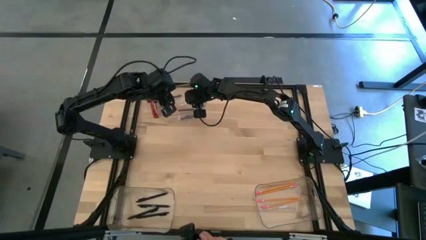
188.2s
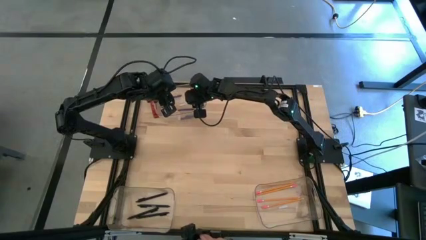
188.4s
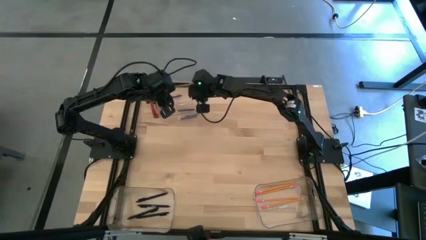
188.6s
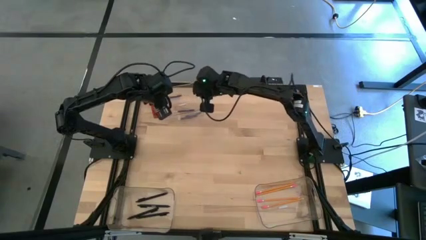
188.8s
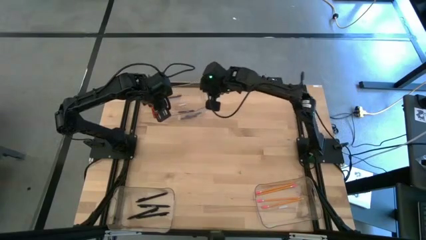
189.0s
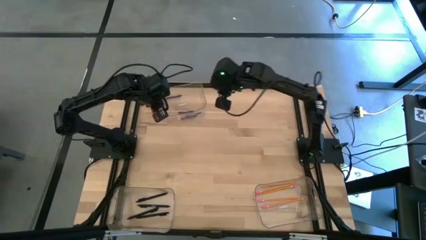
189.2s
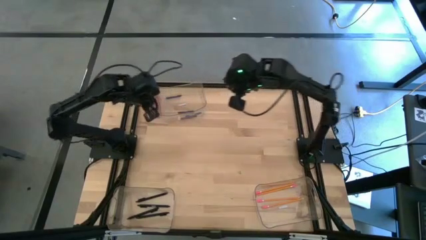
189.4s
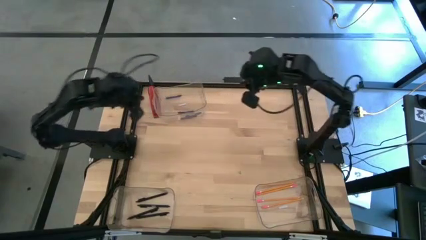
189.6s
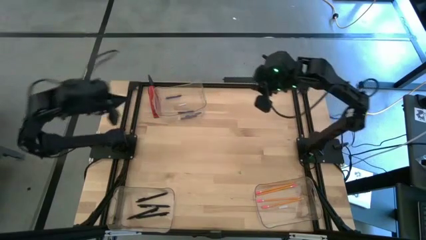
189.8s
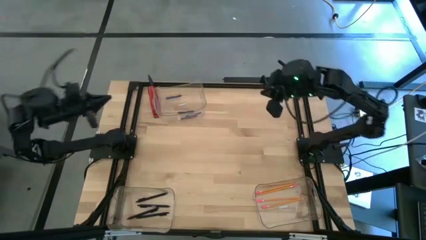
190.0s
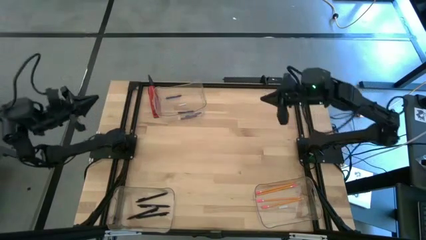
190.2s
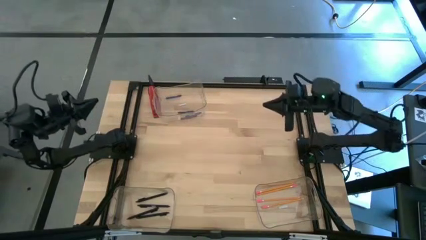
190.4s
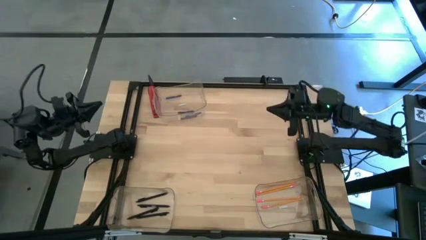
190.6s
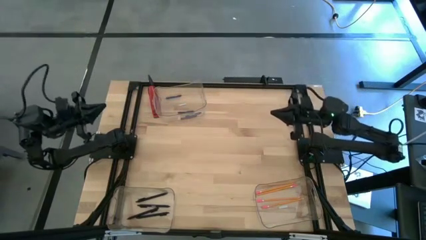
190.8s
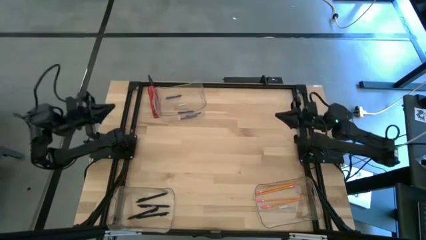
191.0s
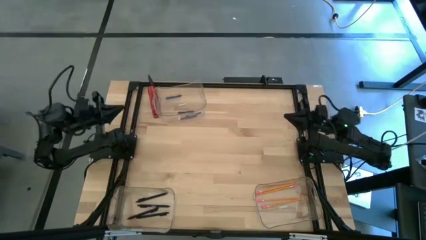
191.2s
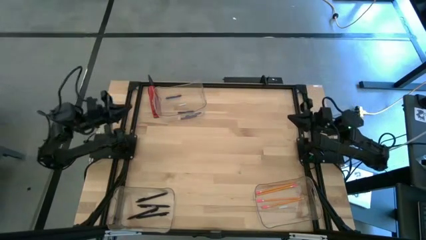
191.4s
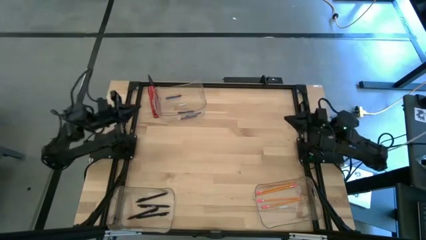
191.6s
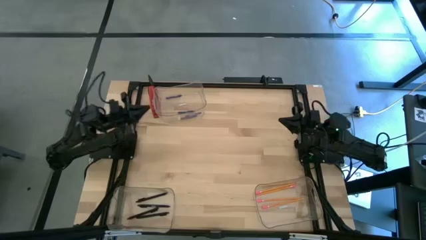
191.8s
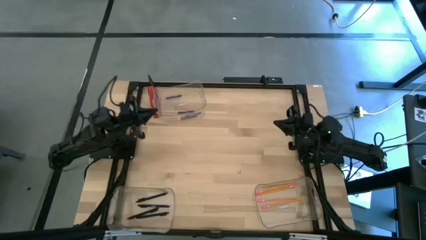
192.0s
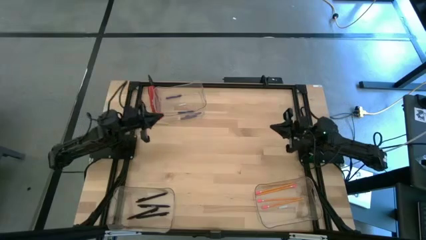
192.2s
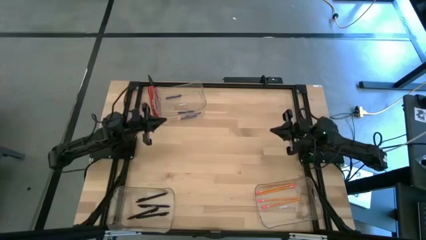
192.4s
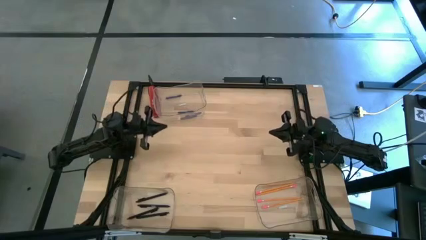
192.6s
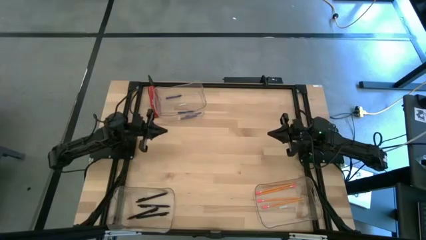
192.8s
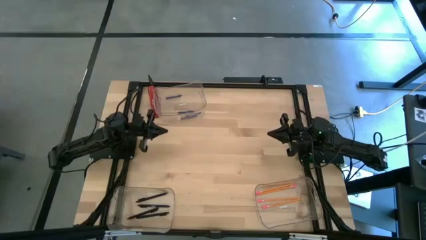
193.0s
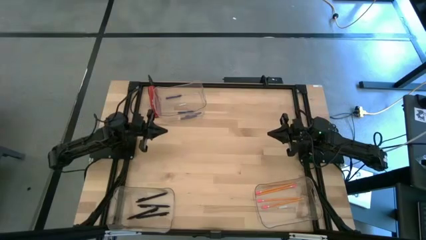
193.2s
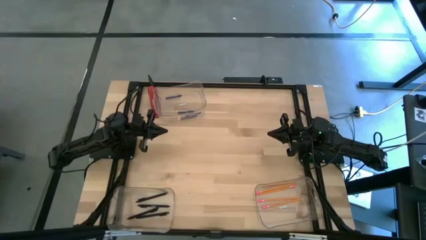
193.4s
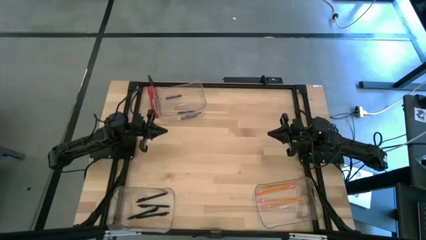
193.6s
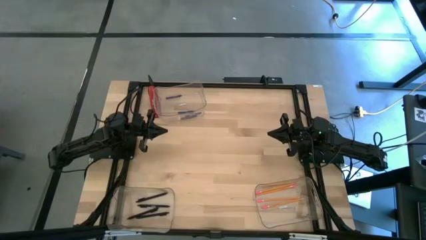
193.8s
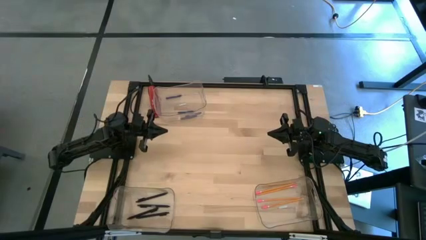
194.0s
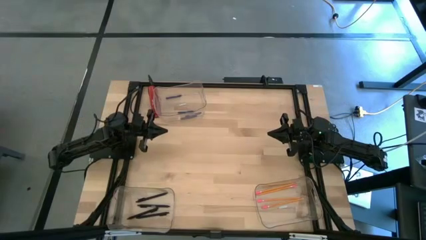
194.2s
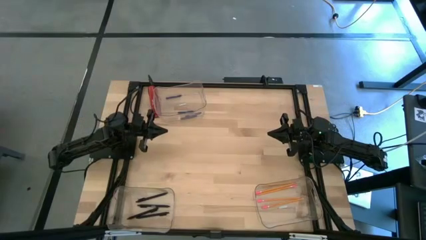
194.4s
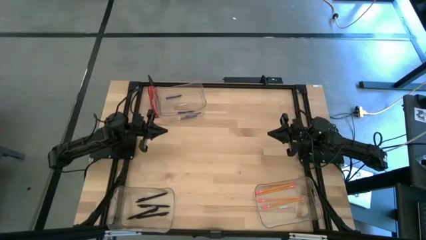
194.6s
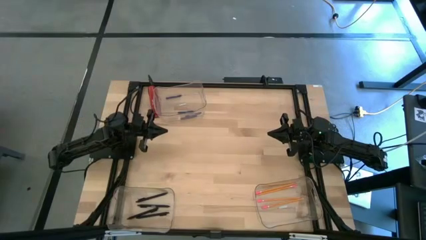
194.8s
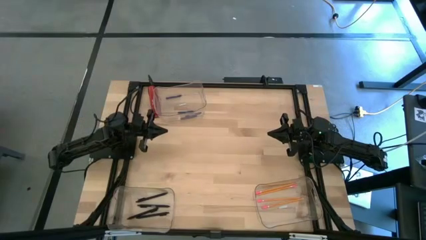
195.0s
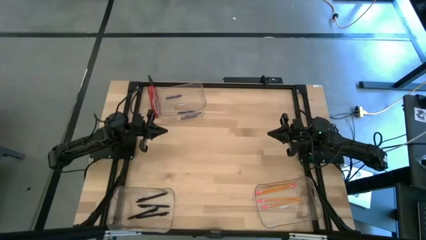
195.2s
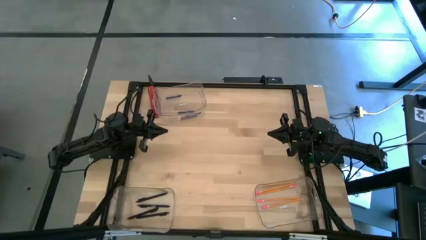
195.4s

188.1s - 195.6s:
Task: Sort crayons/erasers/pens/pencils in bins
Return to Home Position

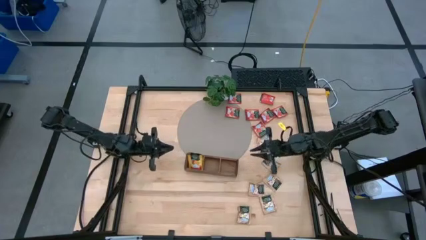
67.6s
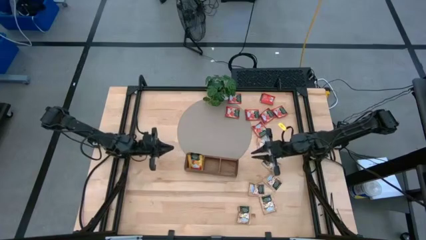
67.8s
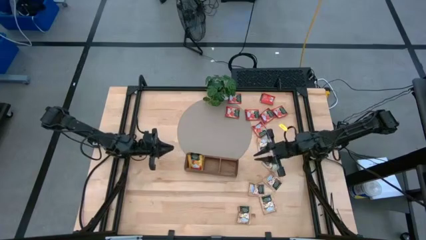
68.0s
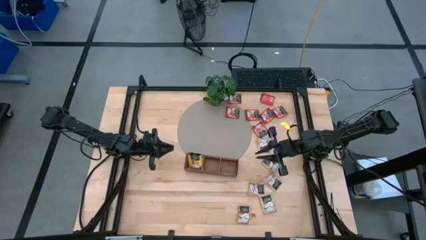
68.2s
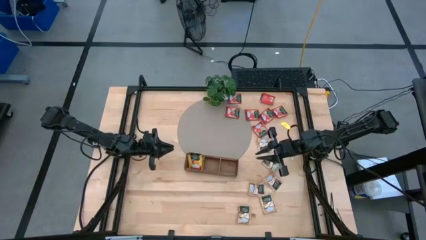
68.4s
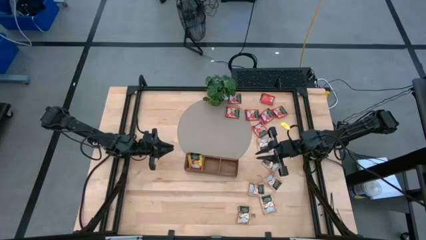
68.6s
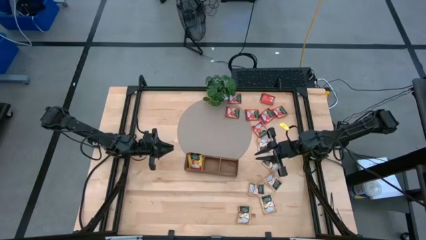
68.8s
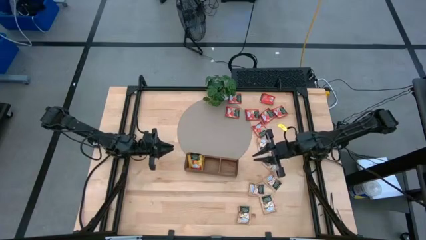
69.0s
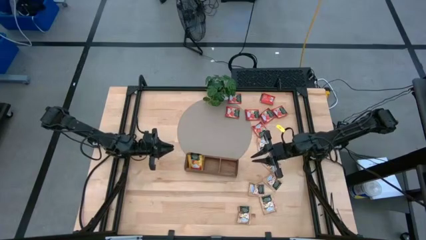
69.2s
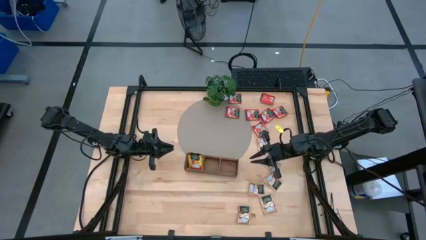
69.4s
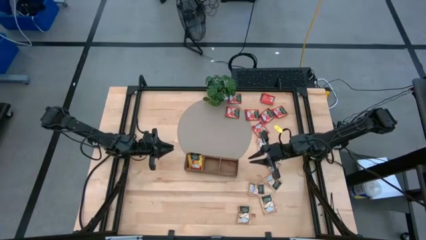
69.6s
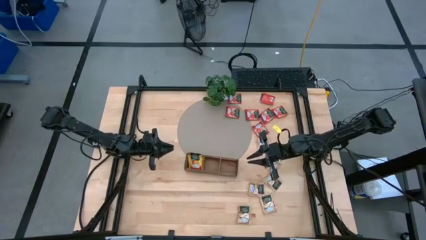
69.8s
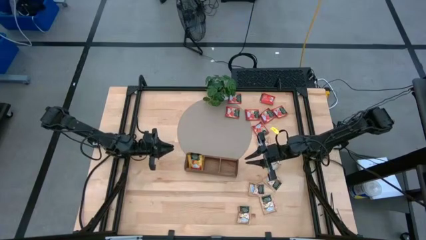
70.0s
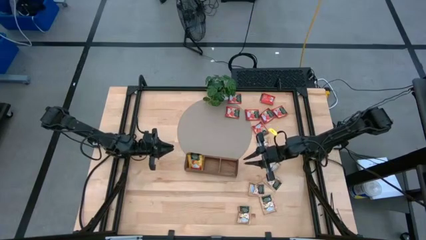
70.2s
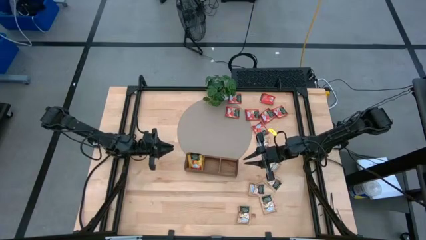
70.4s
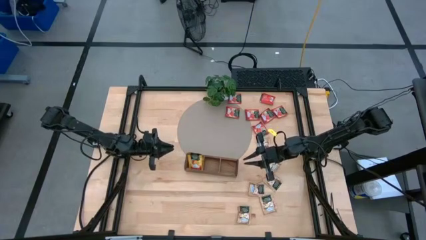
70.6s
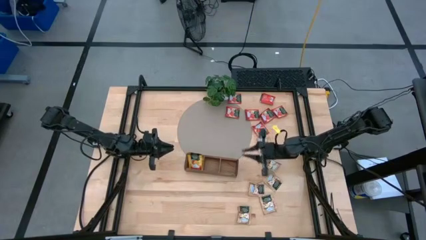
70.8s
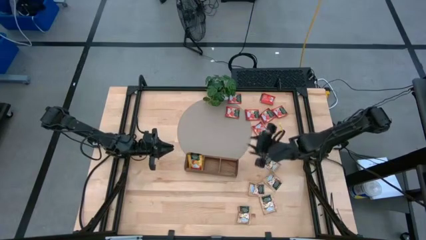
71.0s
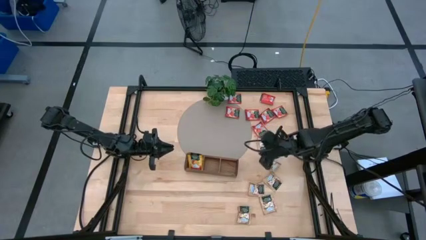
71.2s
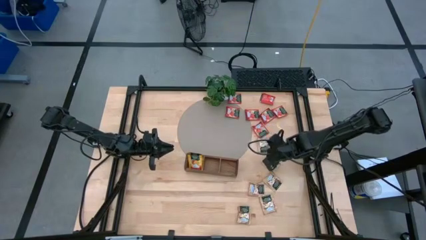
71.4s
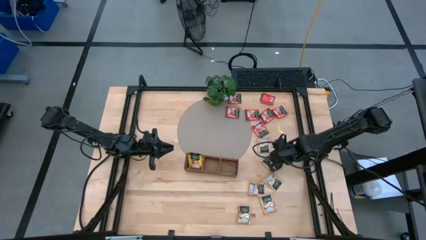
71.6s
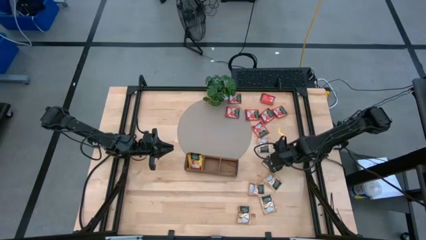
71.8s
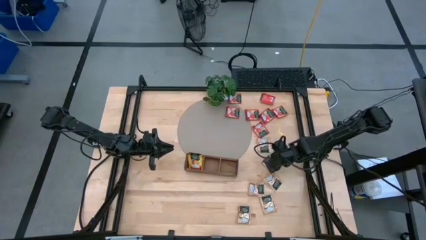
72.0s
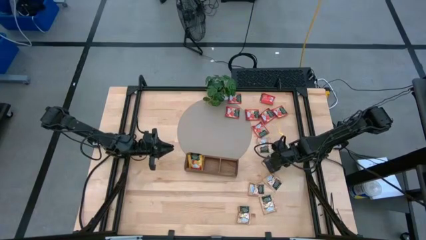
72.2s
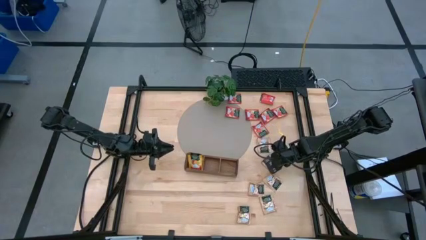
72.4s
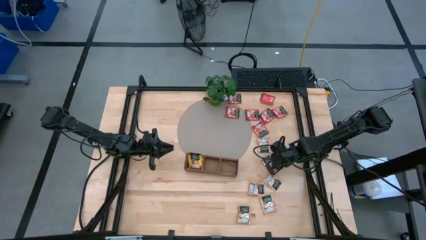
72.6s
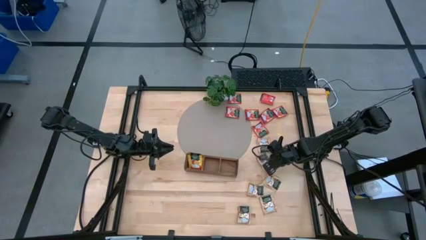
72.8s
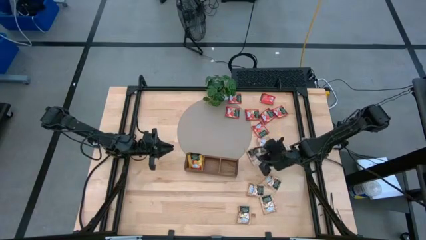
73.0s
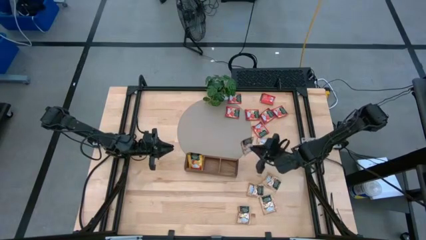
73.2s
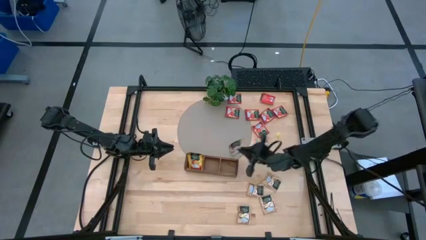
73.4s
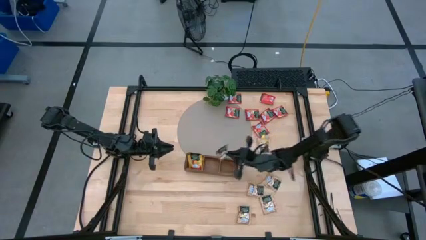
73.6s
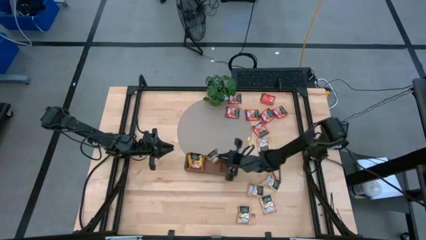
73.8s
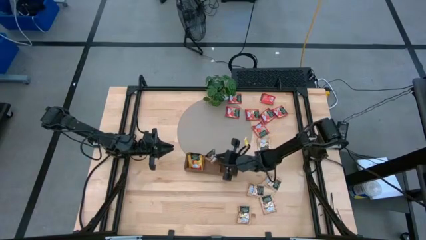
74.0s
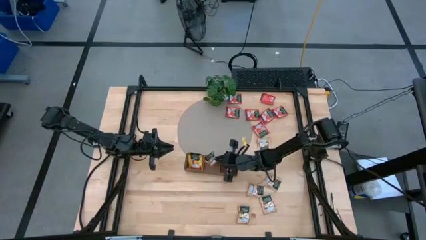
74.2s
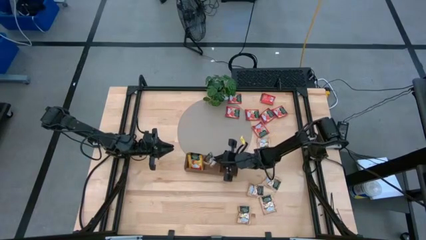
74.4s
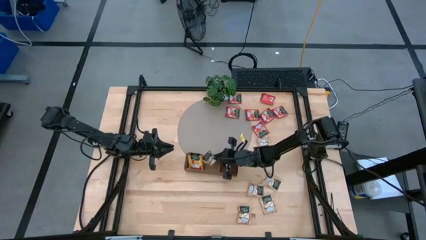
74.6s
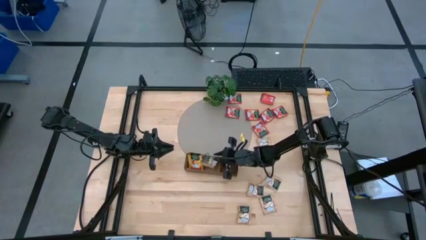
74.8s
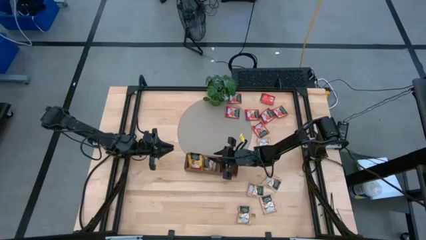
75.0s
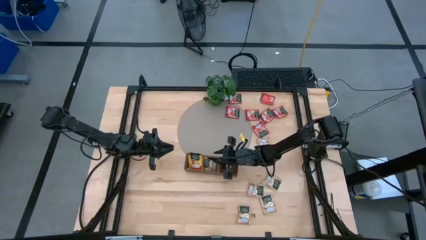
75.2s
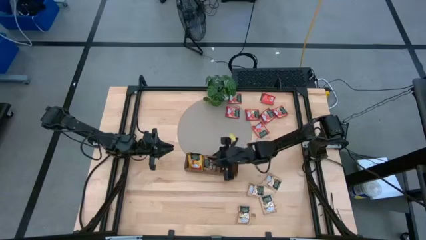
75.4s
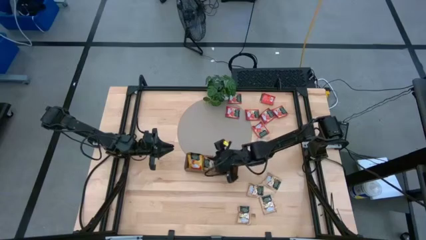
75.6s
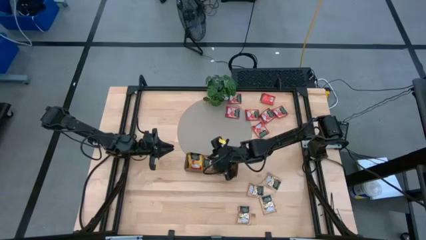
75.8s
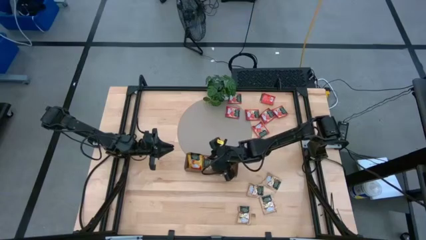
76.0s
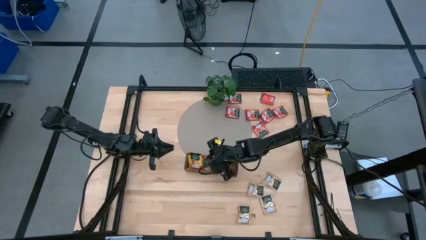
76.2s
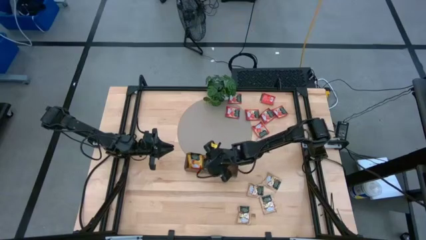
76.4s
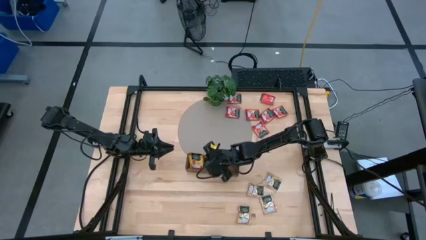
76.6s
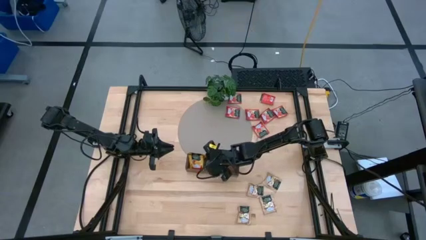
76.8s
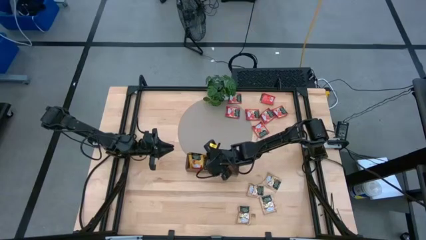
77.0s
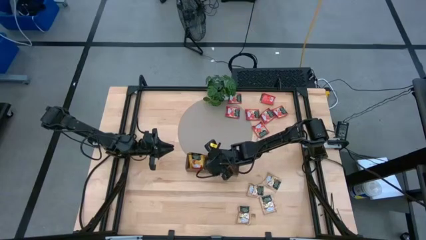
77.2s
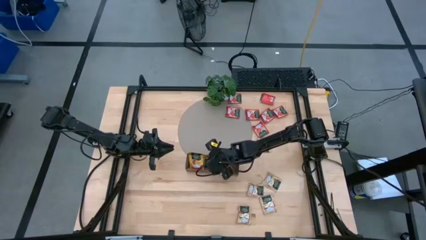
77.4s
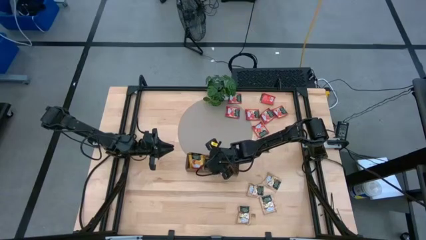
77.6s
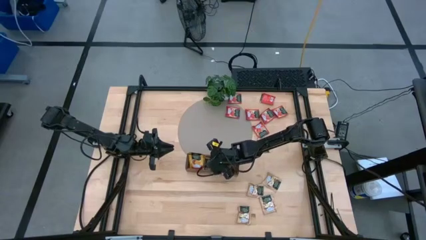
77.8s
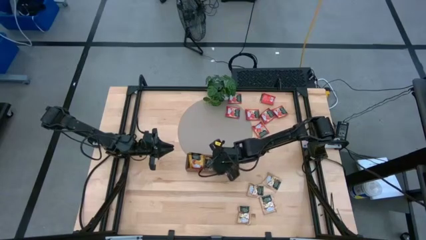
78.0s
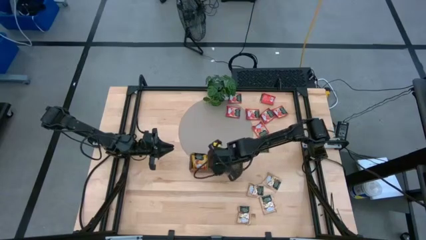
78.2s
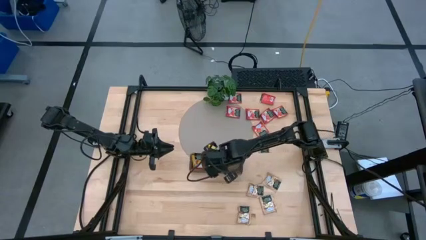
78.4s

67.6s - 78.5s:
Task: Pick & Place Tea
Put the brown tea bag into the middle slot of the wooden organizer
